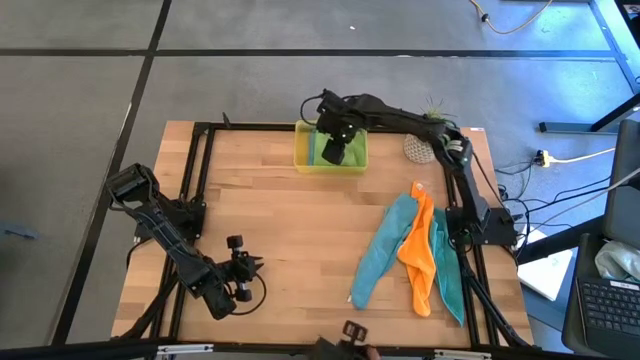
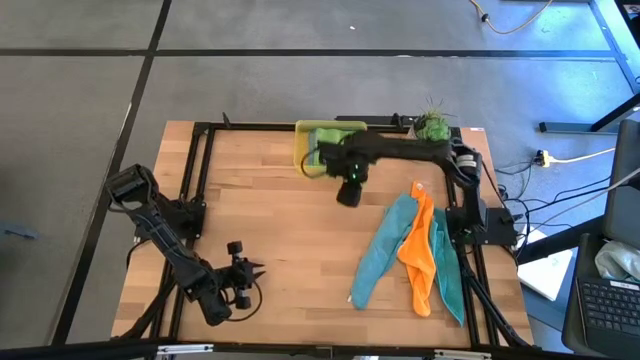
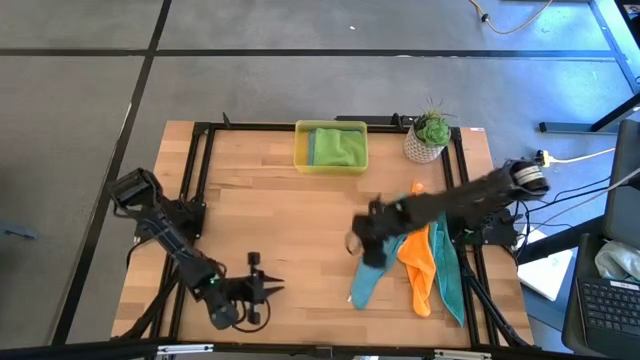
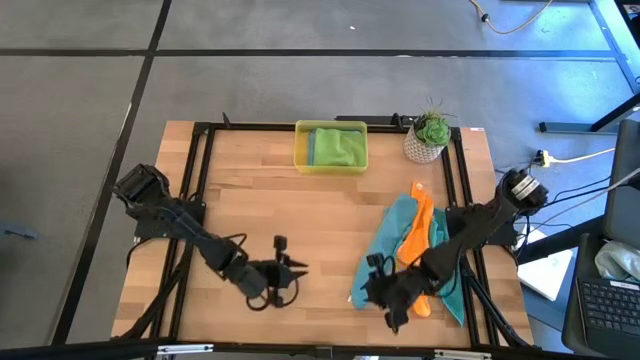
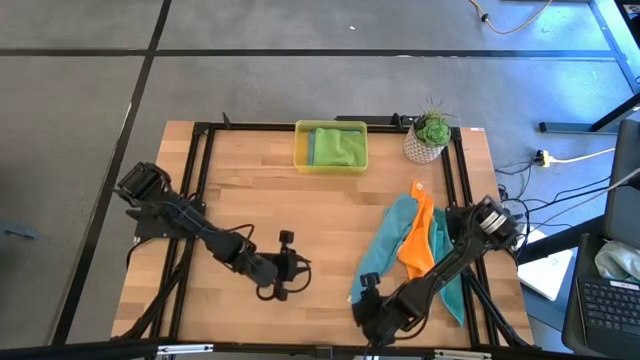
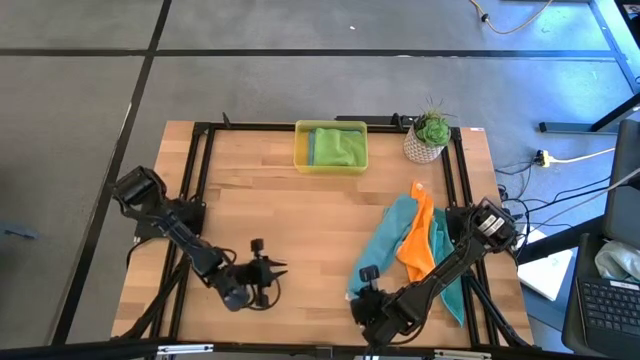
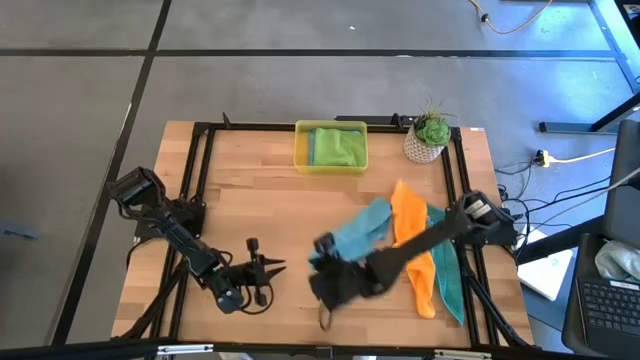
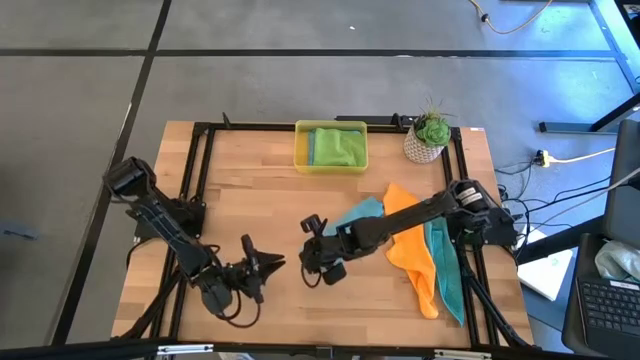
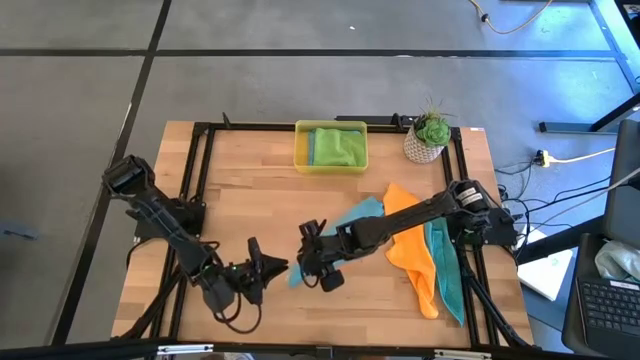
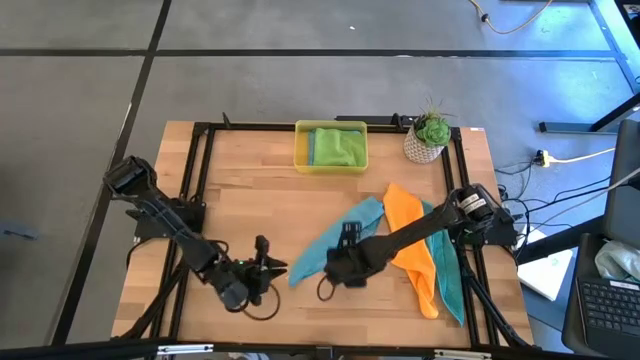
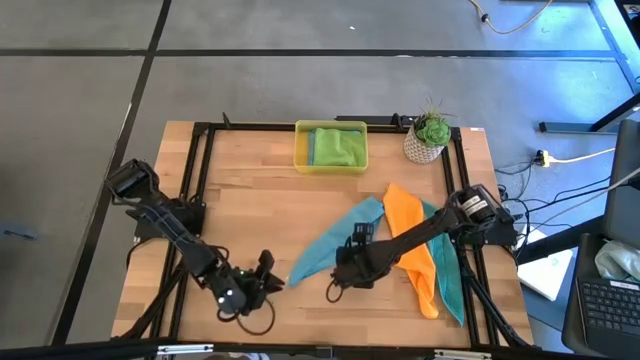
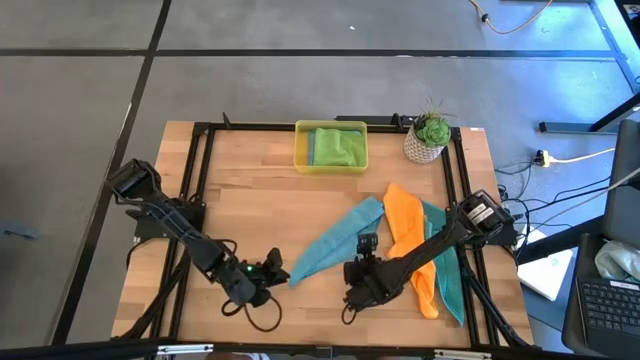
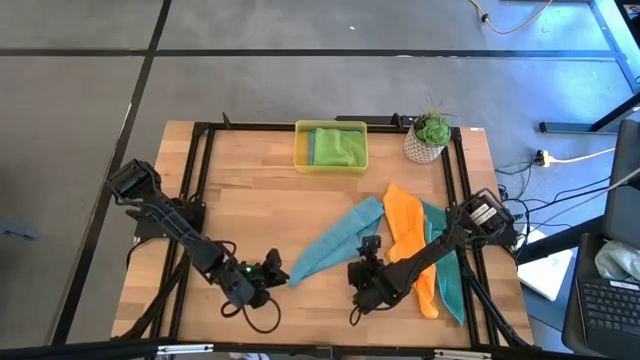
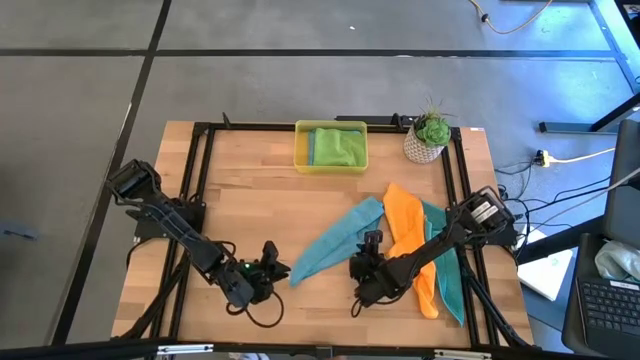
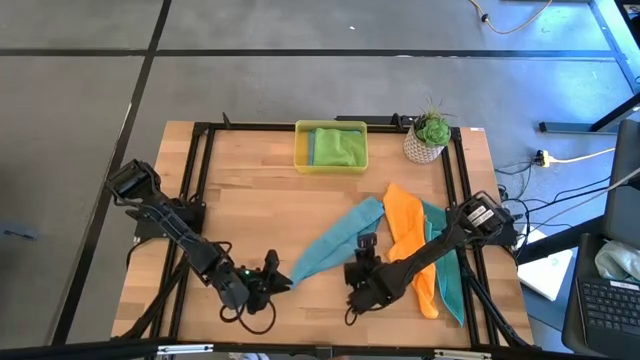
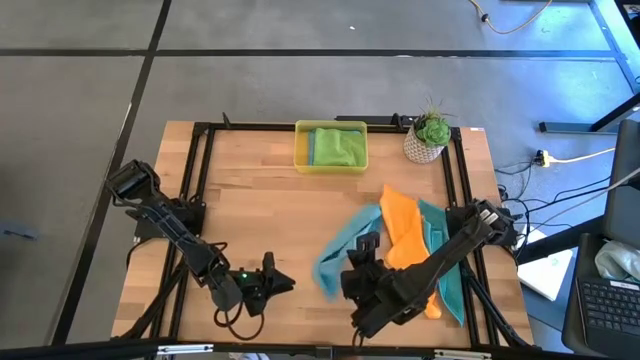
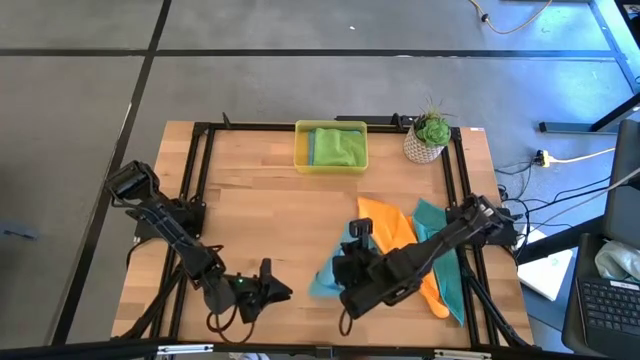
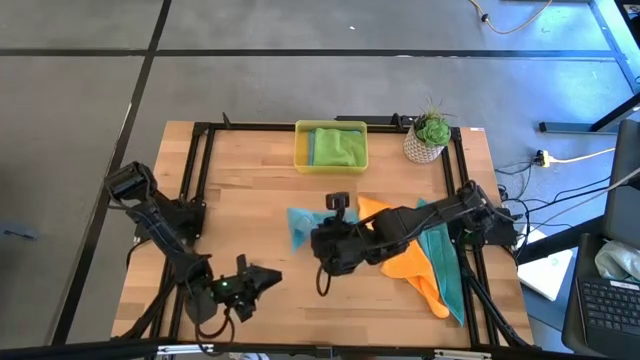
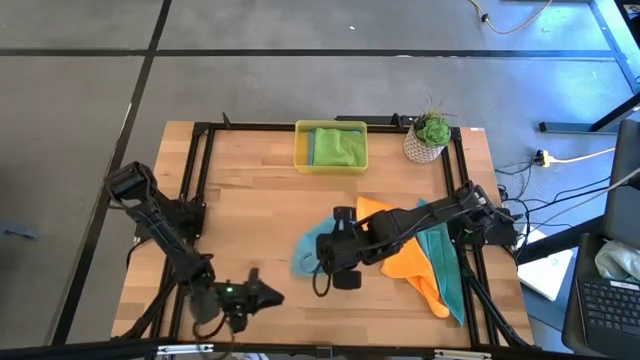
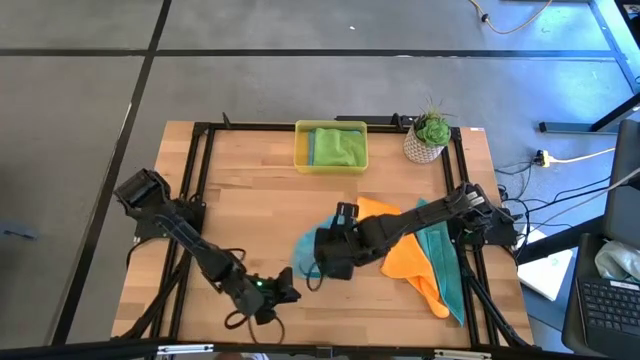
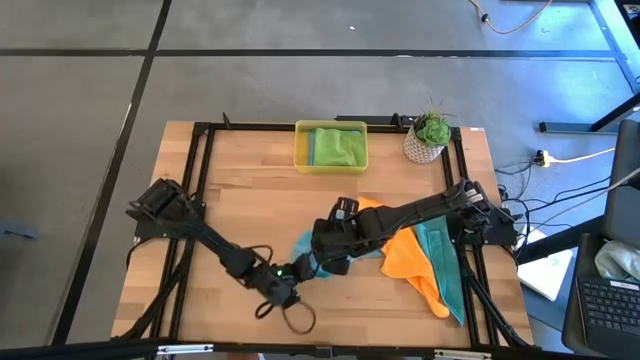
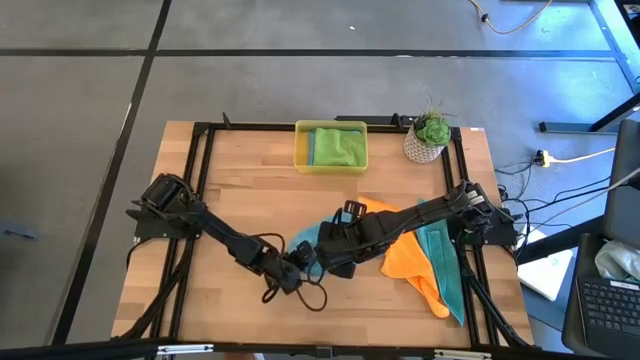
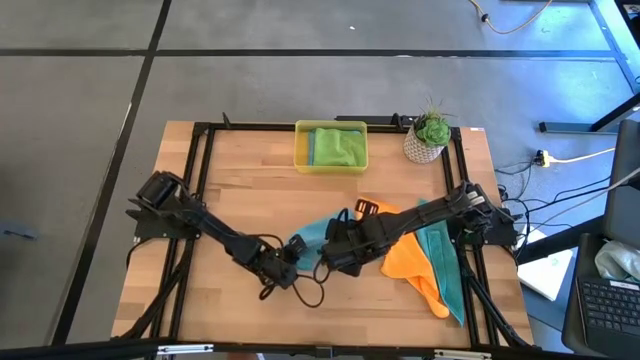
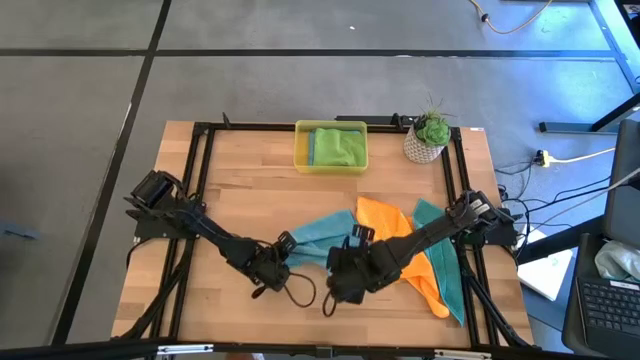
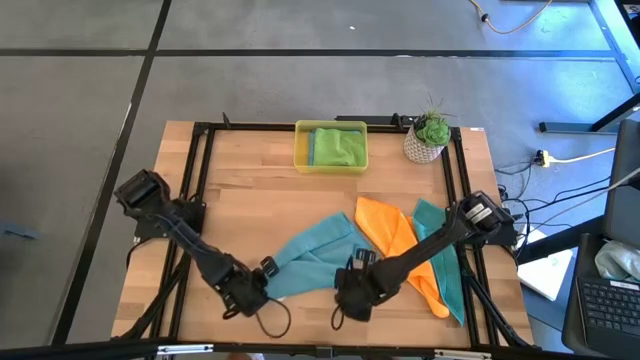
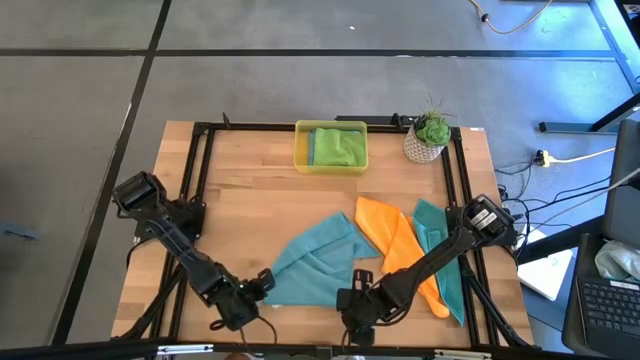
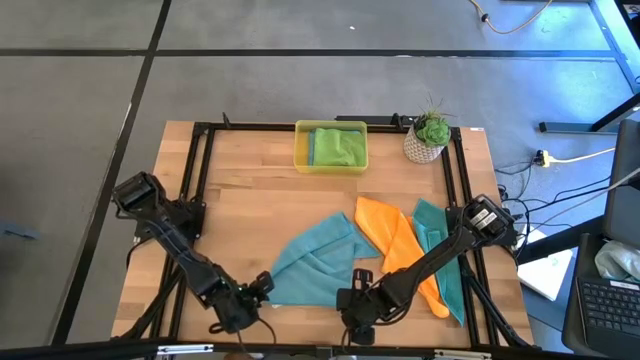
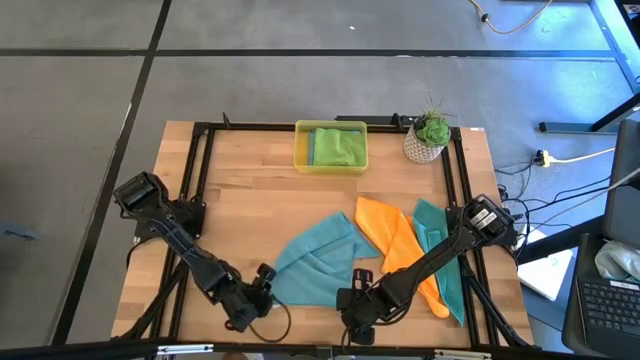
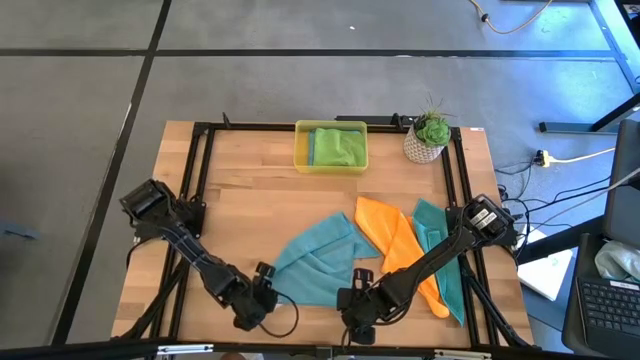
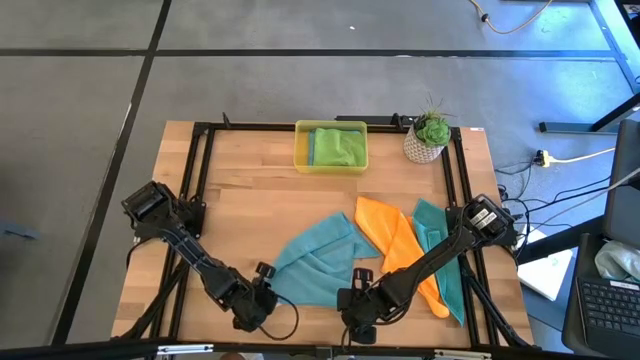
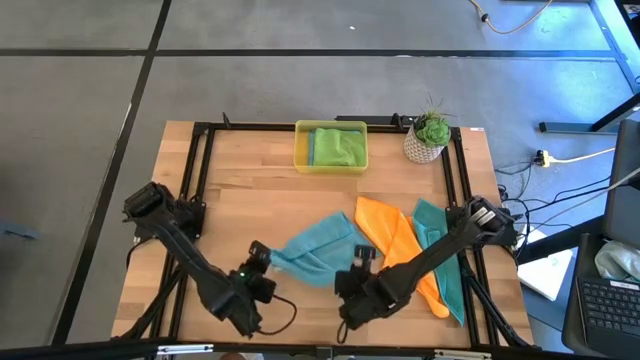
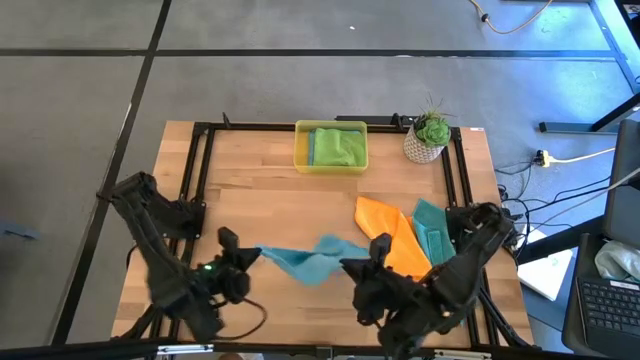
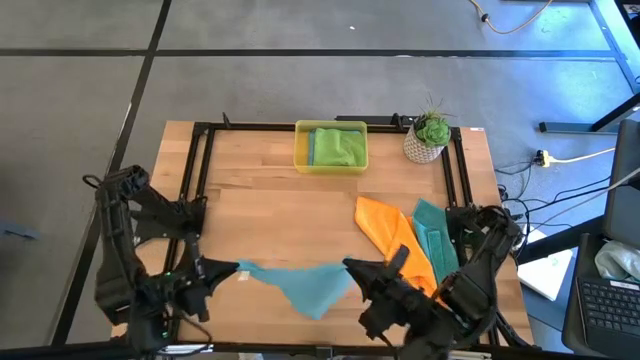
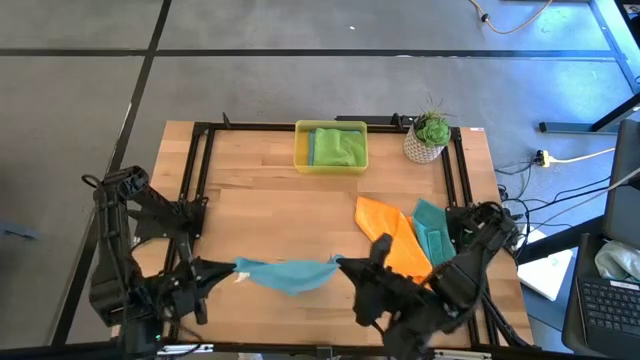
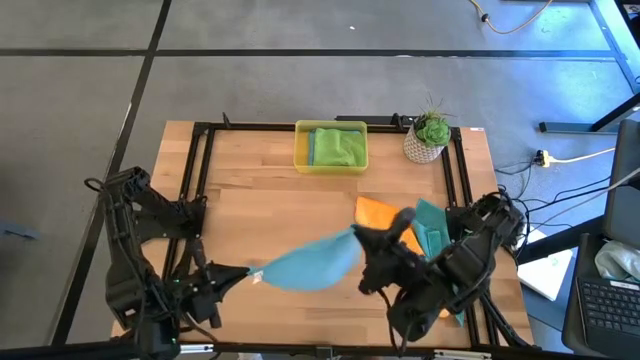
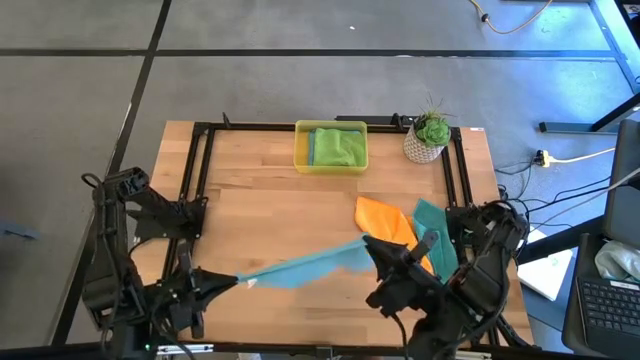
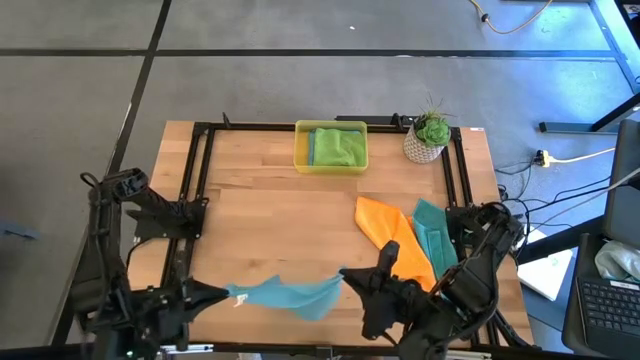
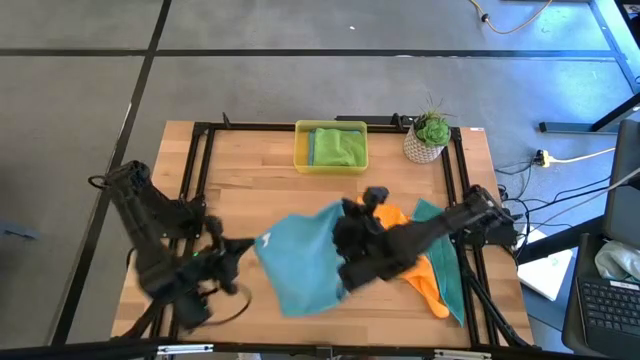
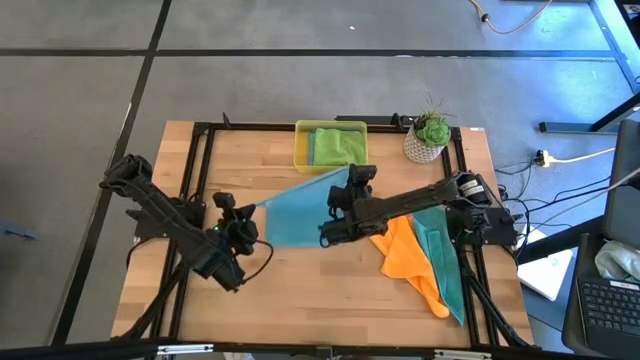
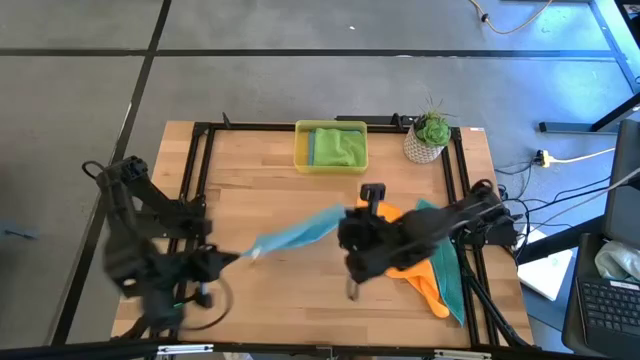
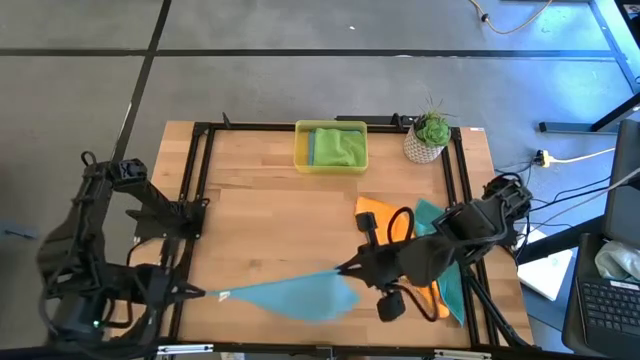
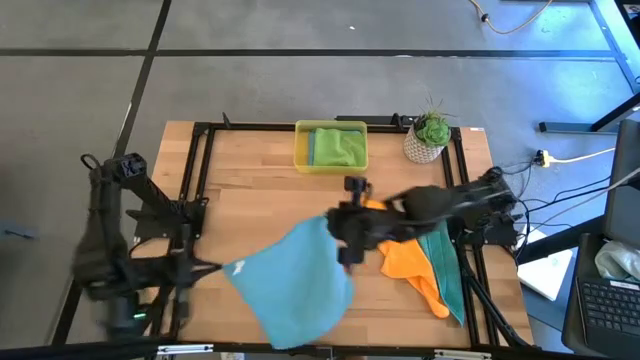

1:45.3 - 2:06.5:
Task: Fold microfiber towels
Fold the left blue cloth
